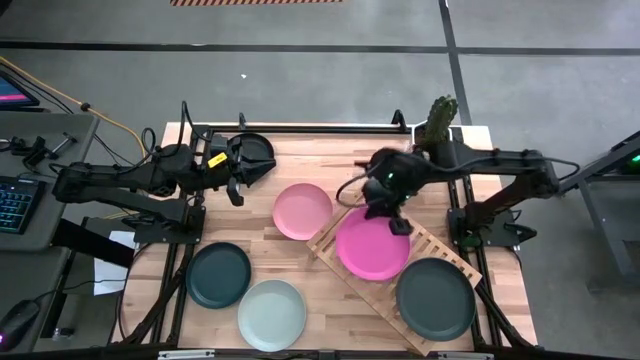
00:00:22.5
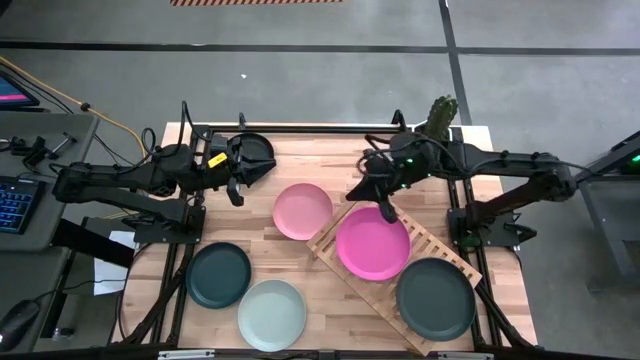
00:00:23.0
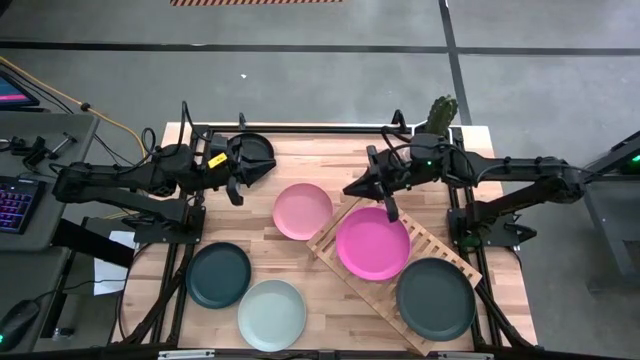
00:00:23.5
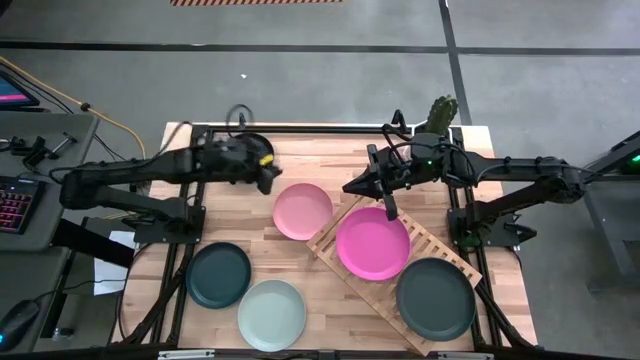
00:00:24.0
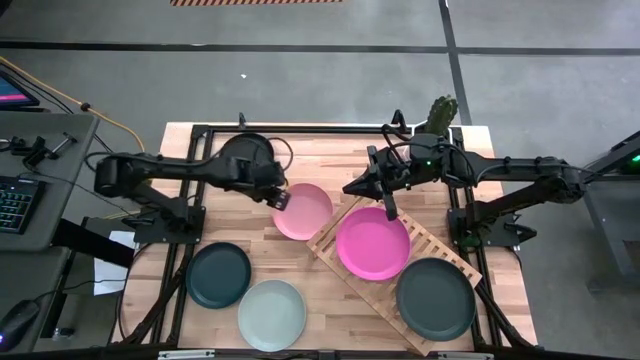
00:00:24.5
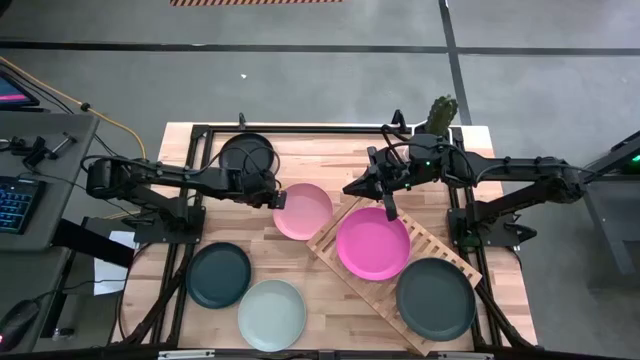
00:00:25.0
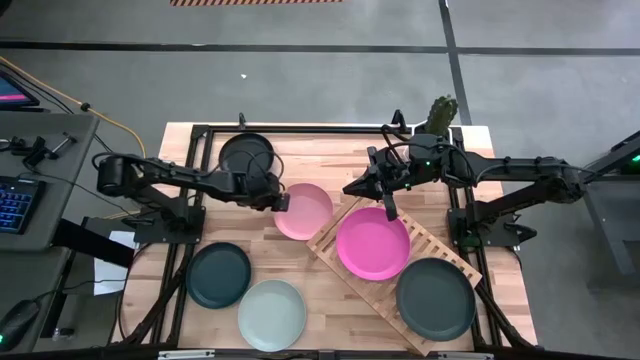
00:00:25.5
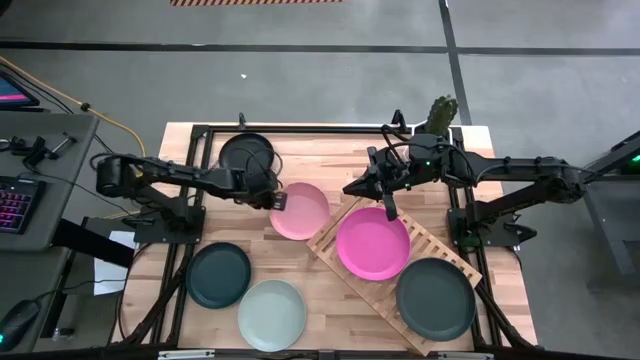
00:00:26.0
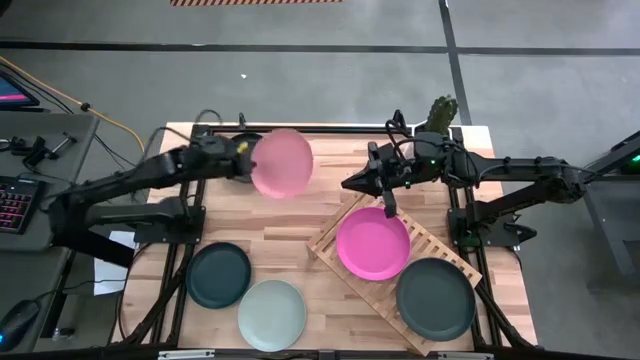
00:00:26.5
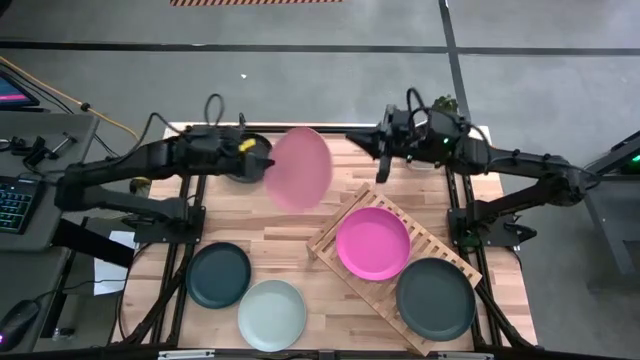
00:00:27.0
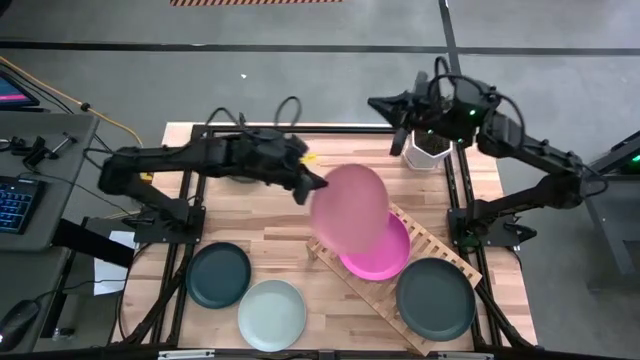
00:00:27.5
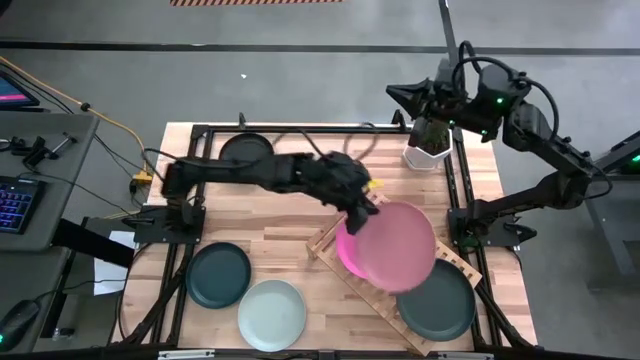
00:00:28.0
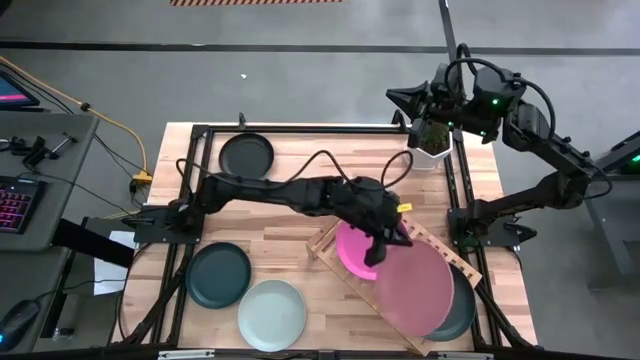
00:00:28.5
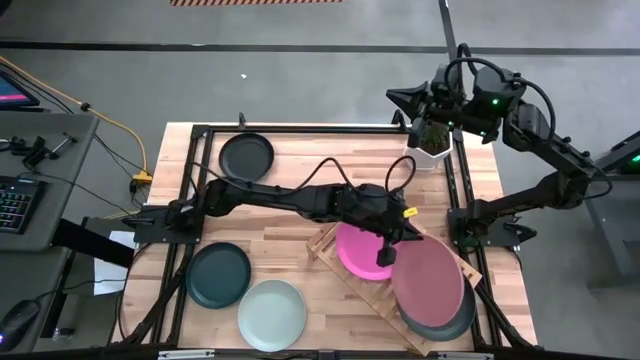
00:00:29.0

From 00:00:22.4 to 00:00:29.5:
Task: Place and stack plates onto a shelf
Stack the light pink plate on top of the black plate on the shelf

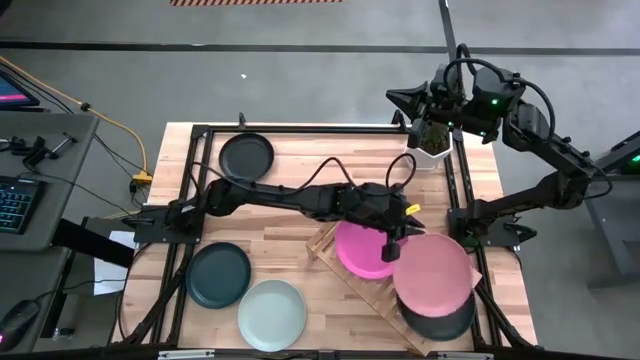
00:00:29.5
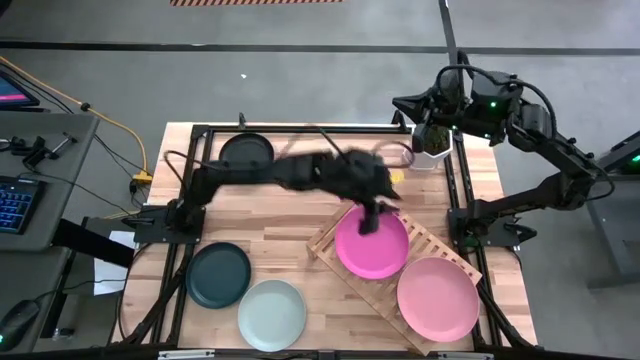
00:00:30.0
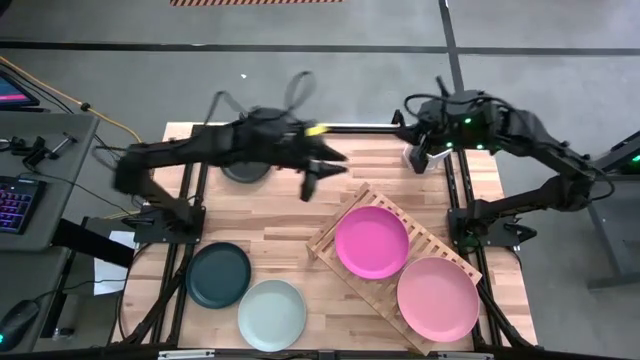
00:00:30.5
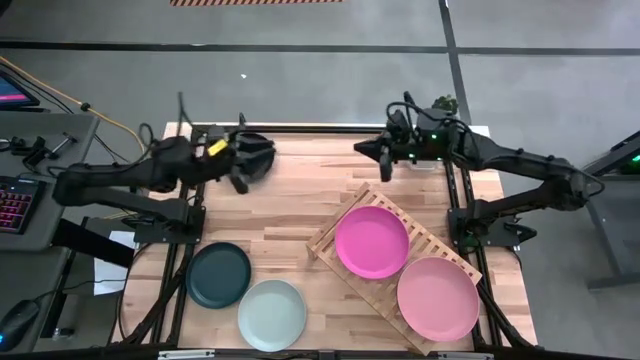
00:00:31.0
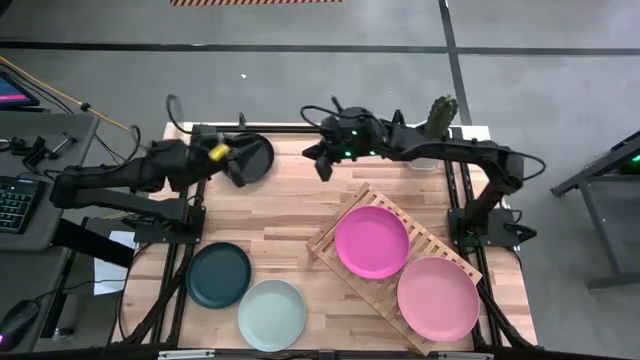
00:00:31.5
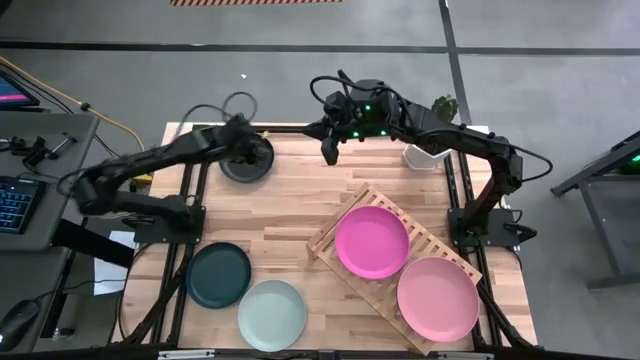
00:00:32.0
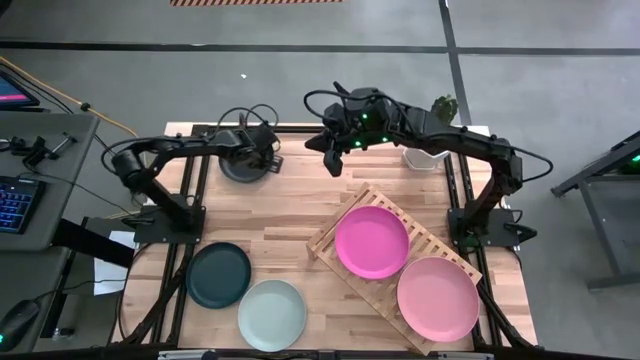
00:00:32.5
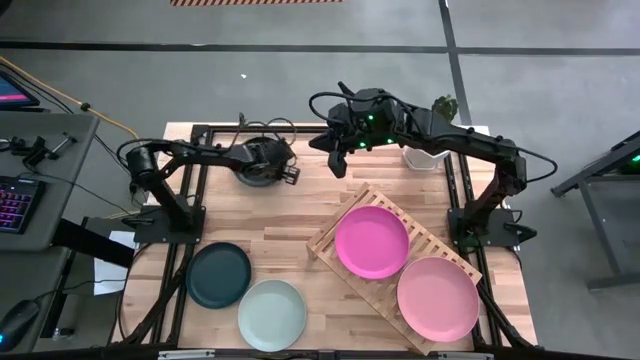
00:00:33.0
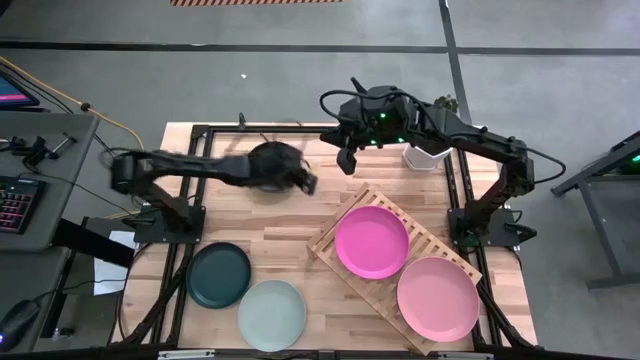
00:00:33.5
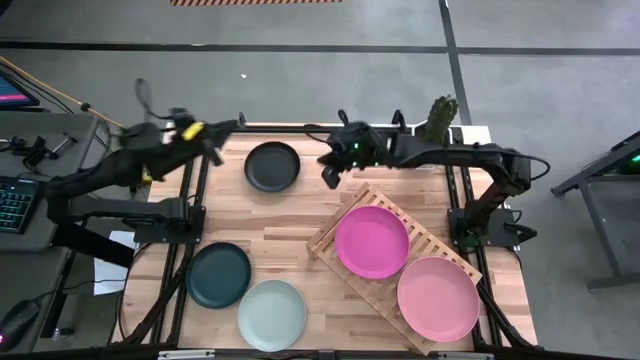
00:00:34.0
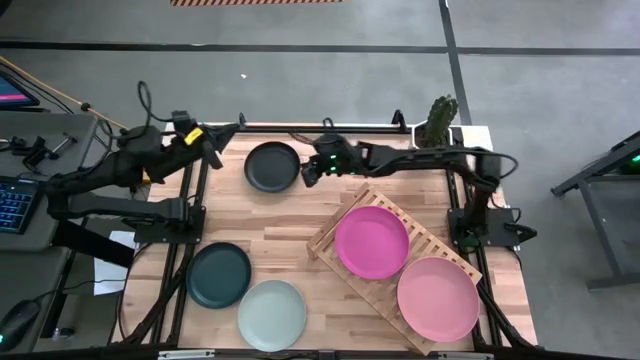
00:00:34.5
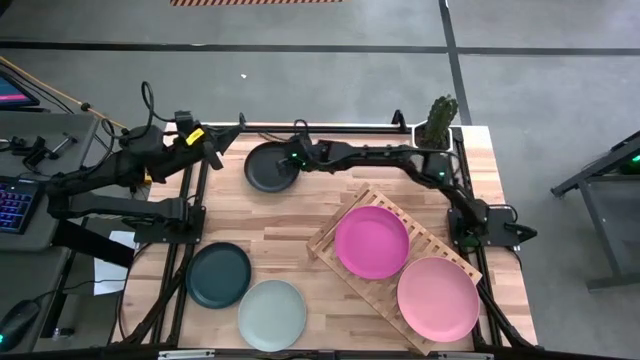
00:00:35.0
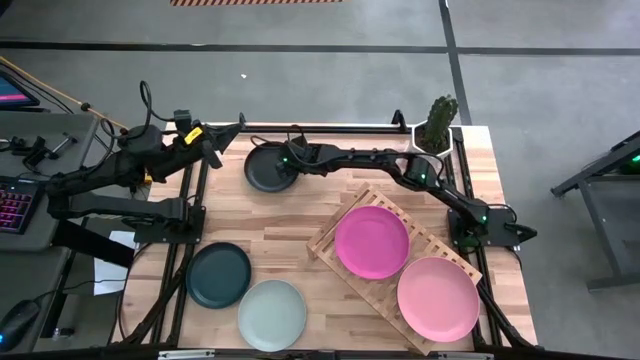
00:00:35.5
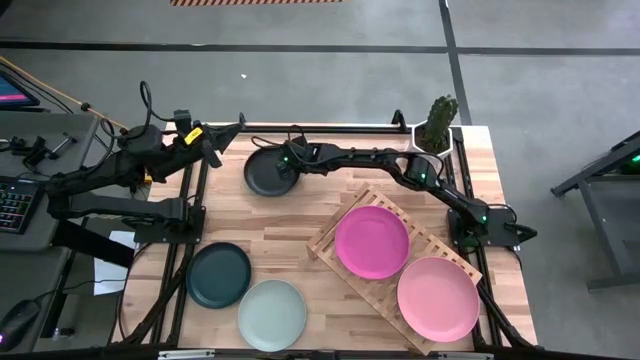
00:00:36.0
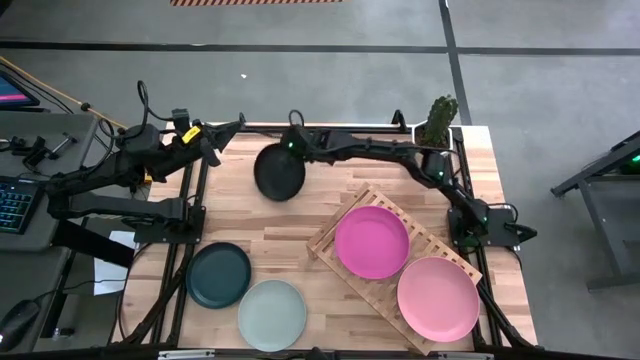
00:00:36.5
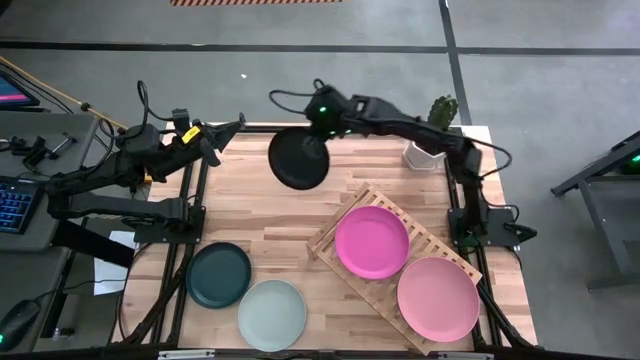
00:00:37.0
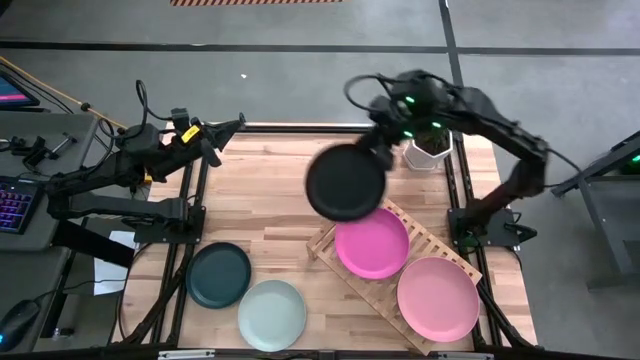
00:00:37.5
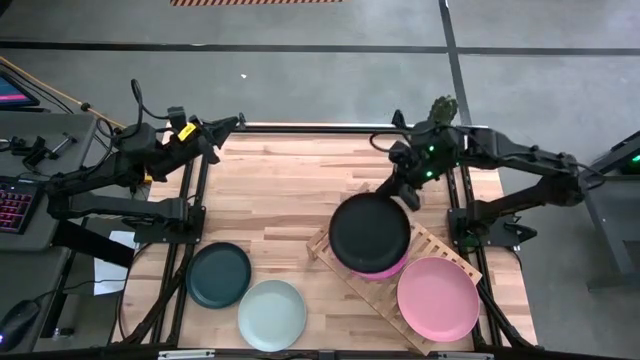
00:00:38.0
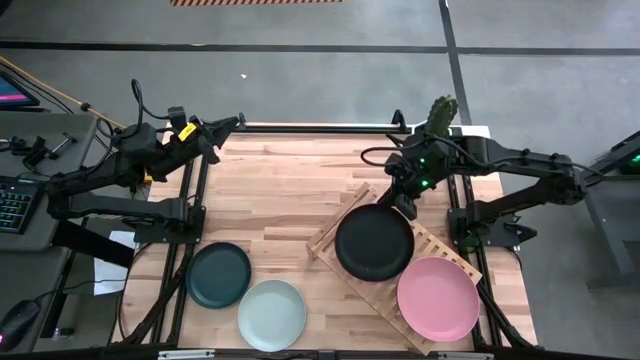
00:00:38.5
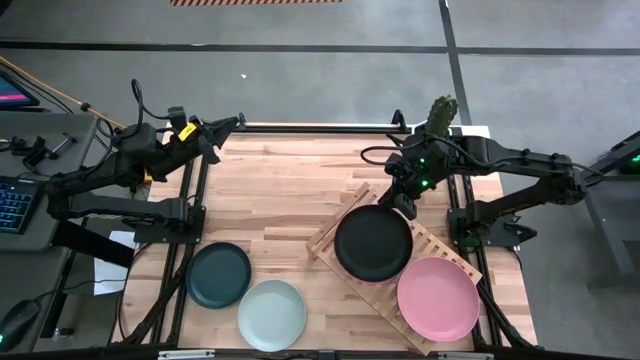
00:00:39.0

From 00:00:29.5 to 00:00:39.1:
Stack the black plate on top of the pink plate on the shelf

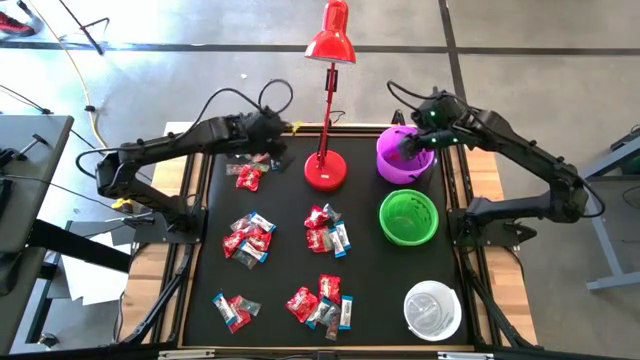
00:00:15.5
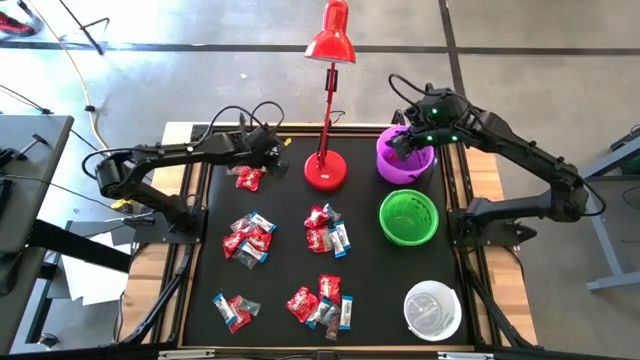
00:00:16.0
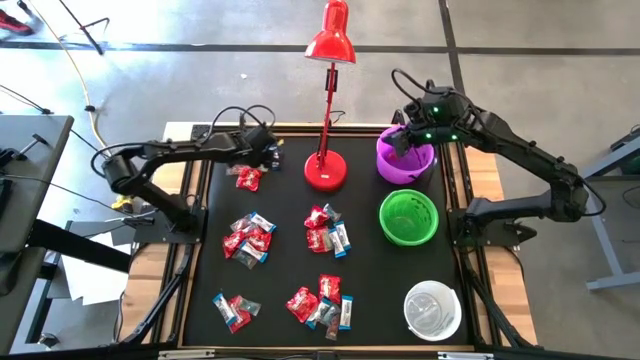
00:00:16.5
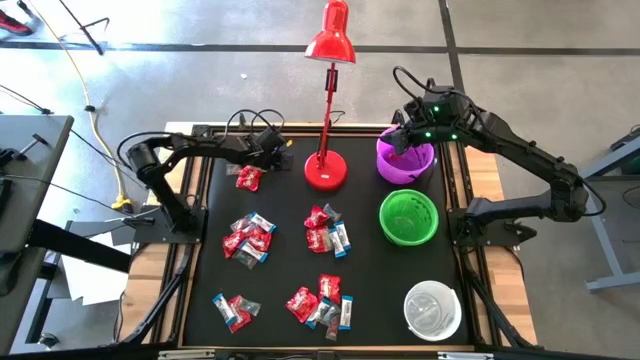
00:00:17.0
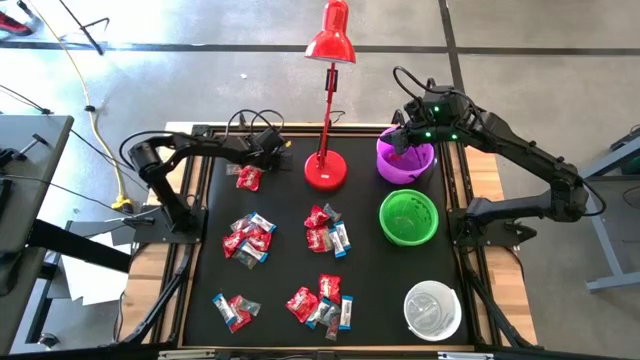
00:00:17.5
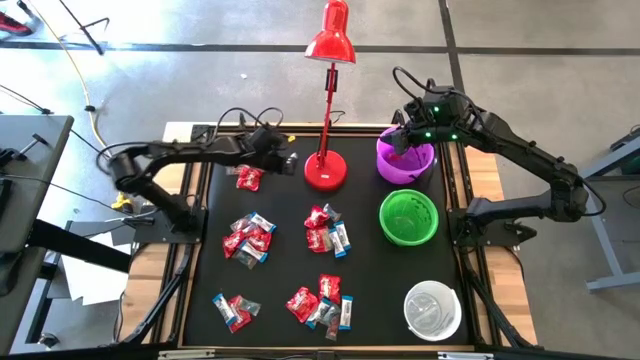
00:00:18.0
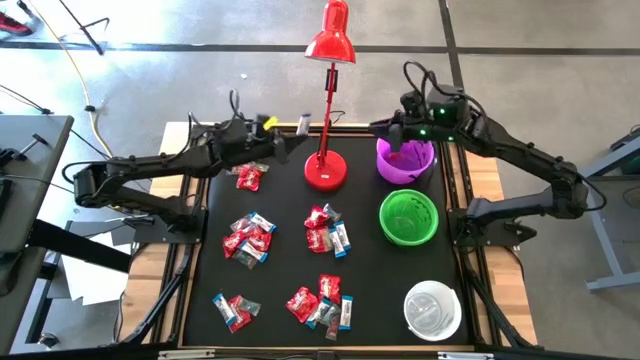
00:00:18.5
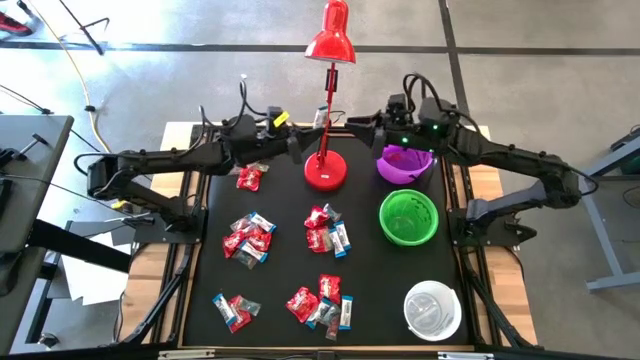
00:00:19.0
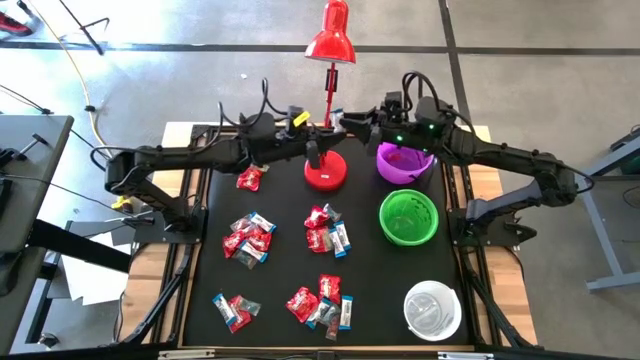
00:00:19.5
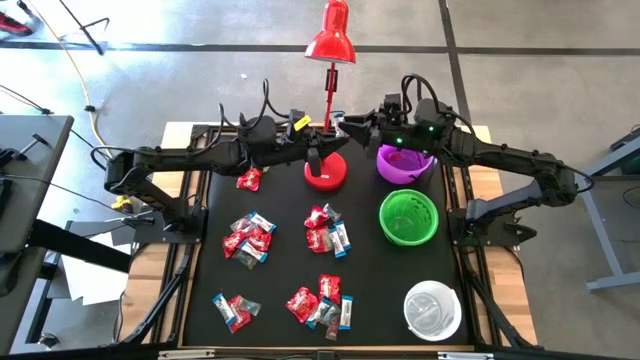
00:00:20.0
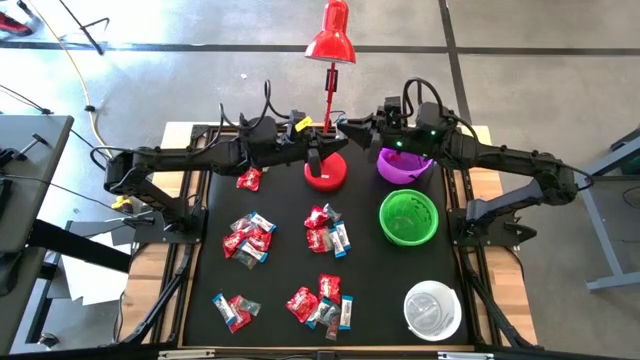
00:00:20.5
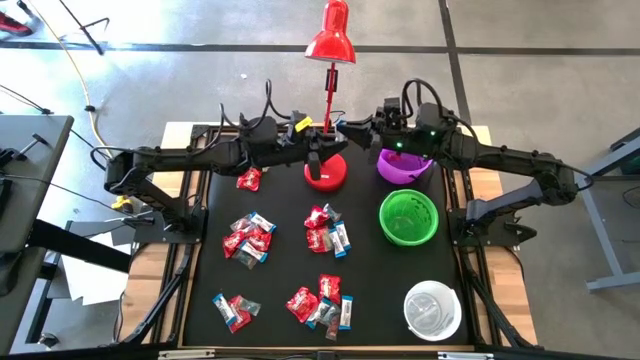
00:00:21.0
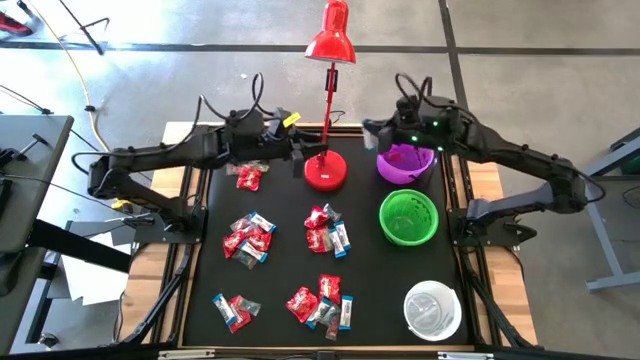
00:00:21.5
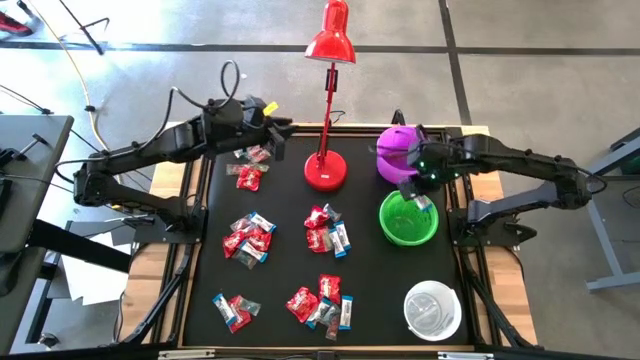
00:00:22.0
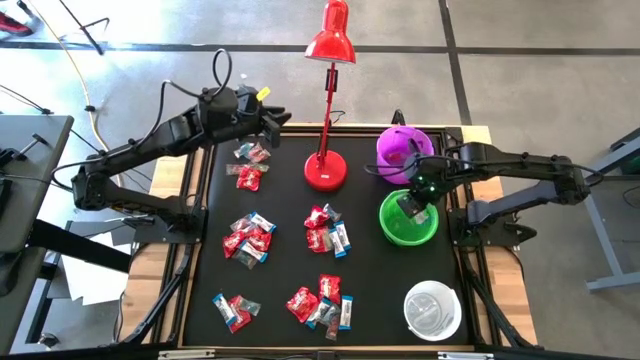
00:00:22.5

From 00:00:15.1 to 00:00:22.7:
Task: Organize candy in baskets
Put the white chocolate bar into the green bucket
